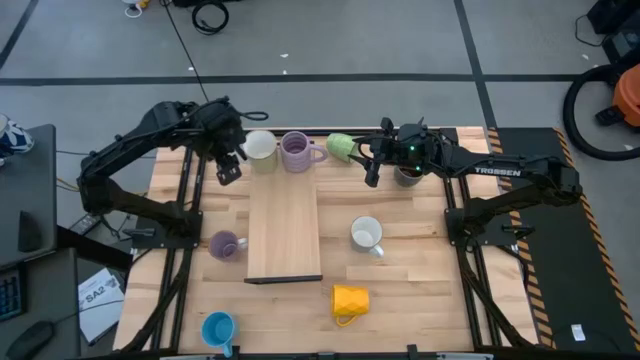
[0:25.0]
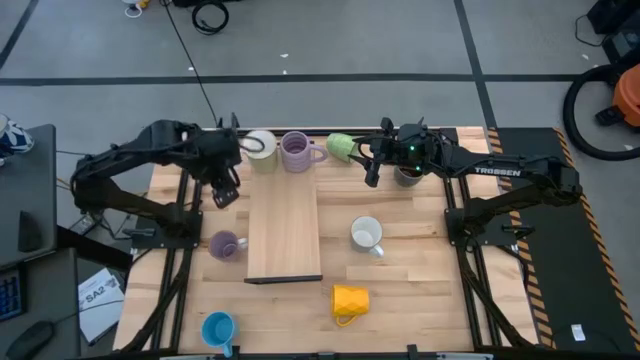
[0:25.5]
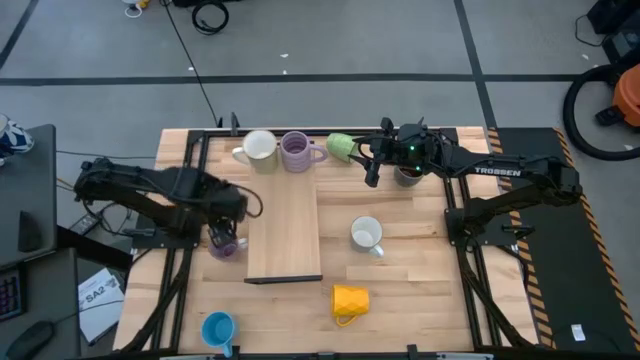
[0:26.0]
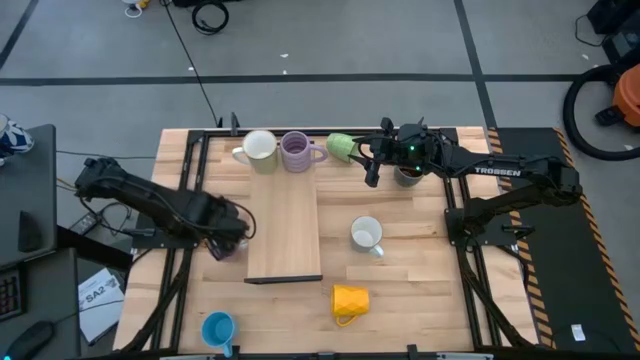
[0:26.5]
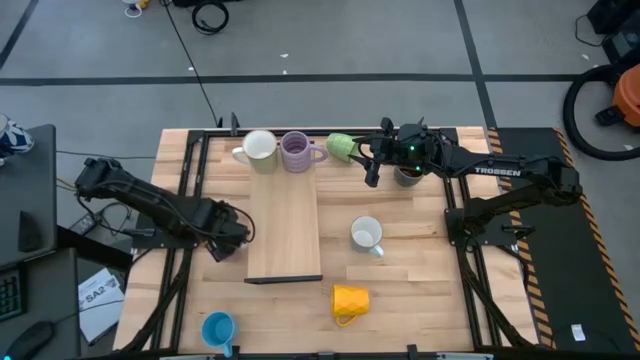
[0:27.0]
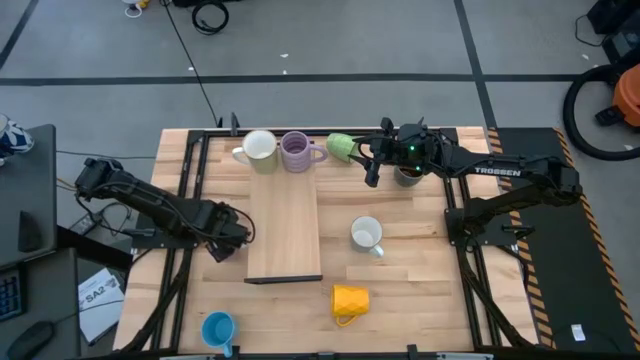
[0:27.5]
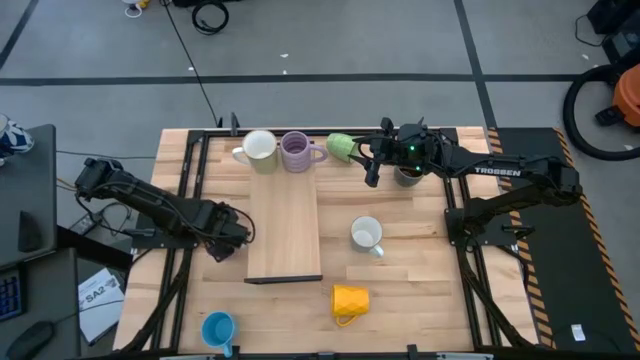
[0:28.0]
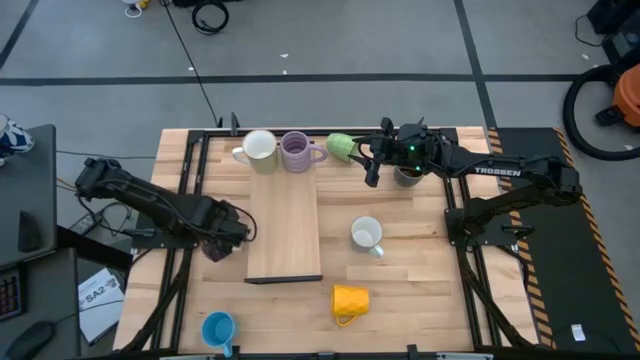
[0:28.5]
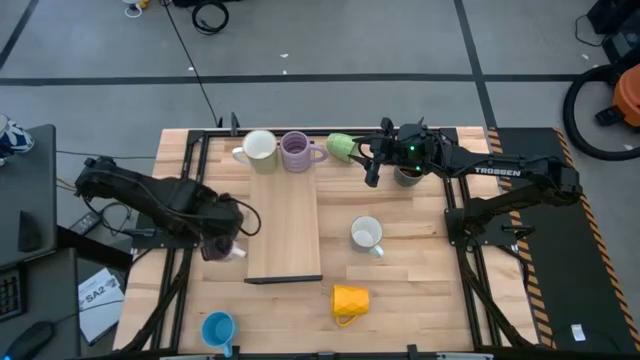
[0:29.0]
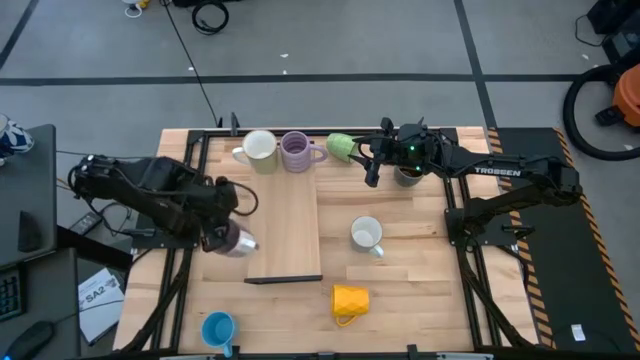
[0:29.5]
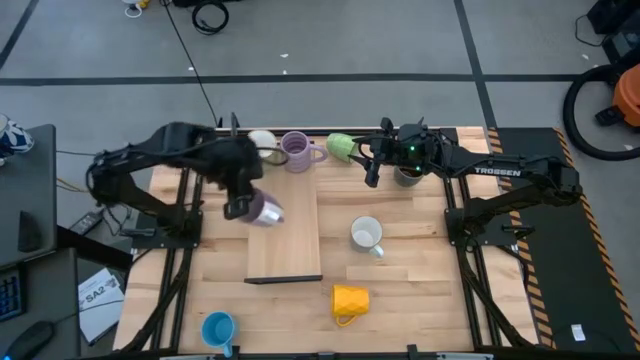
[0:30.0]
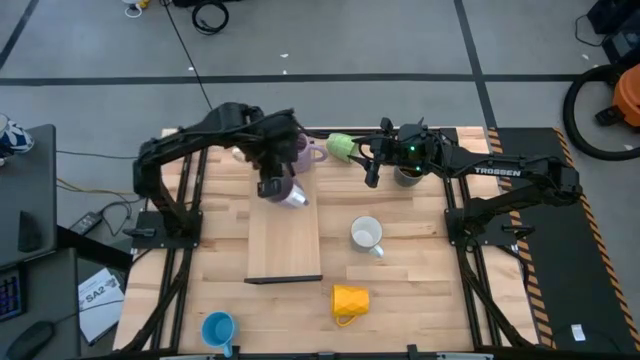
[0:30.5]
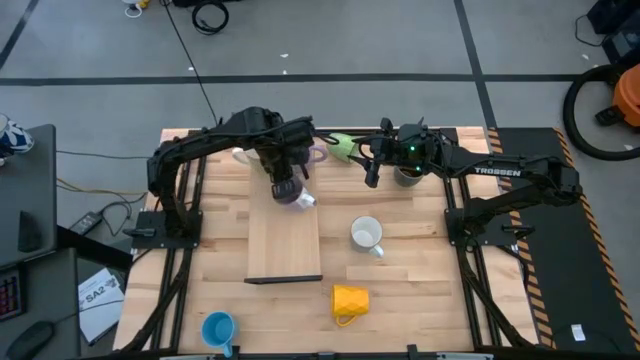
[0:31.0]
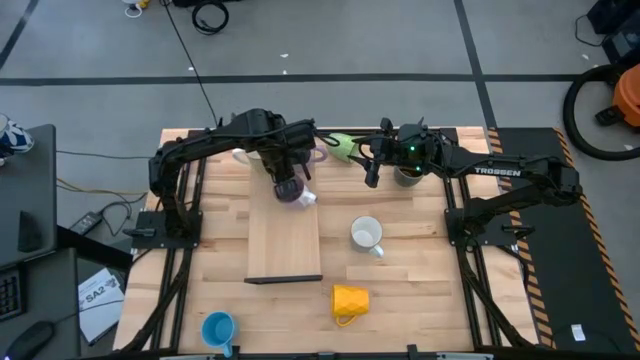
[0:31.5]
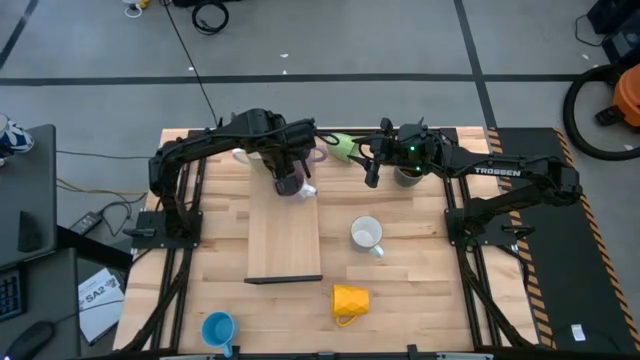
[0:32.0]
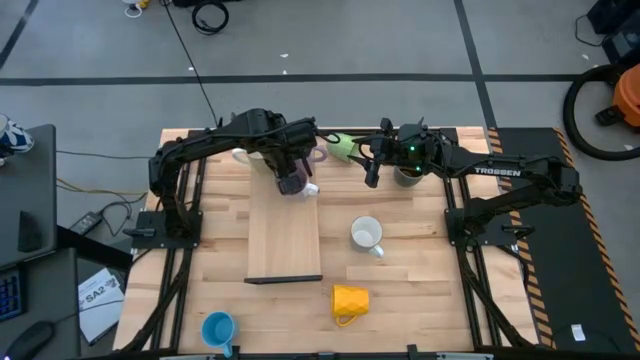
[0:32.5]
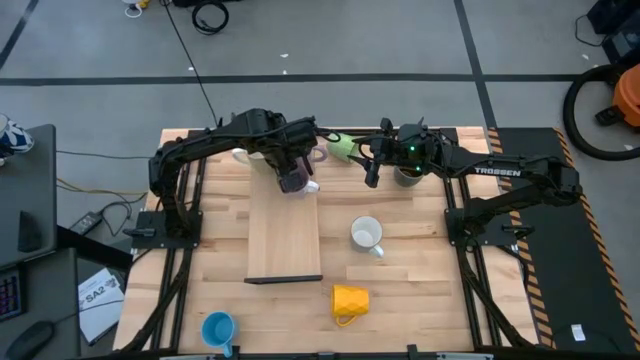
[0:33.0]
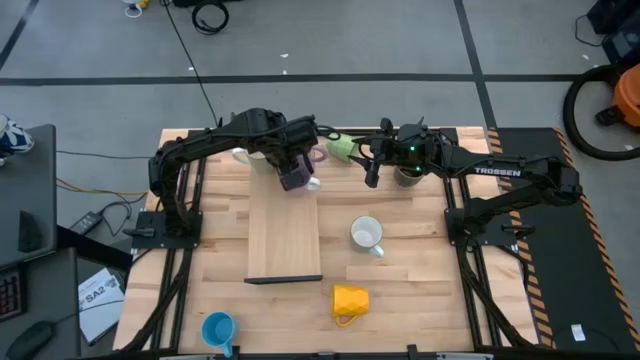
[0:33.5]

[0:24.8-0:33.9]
Task: Place coffee mugs
Put the purple mug on the shelf

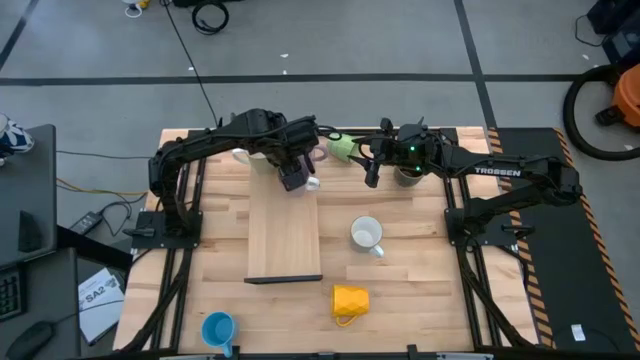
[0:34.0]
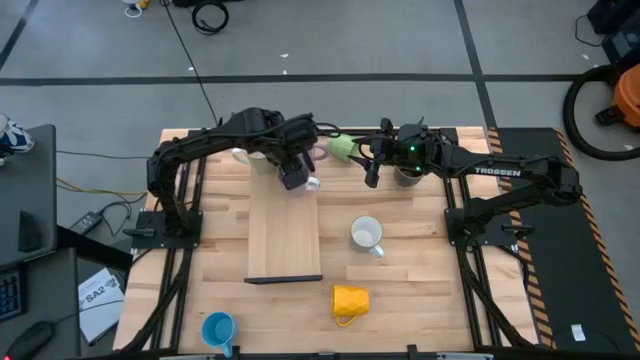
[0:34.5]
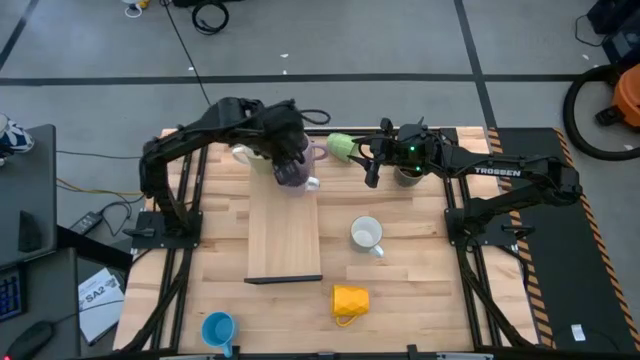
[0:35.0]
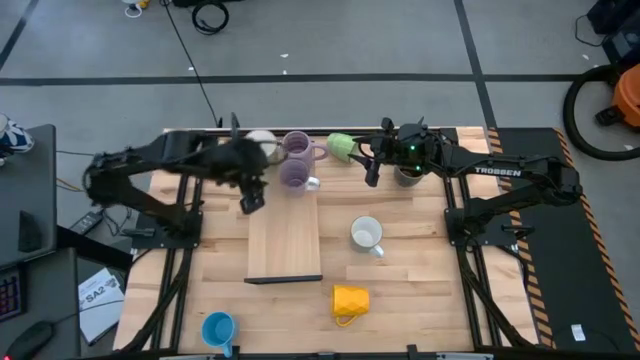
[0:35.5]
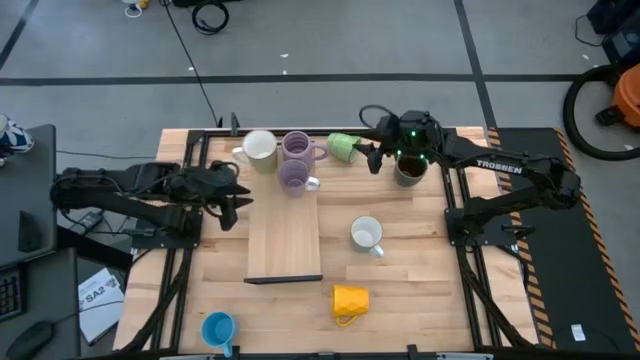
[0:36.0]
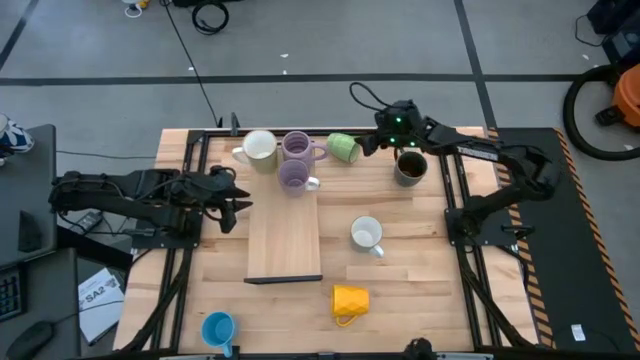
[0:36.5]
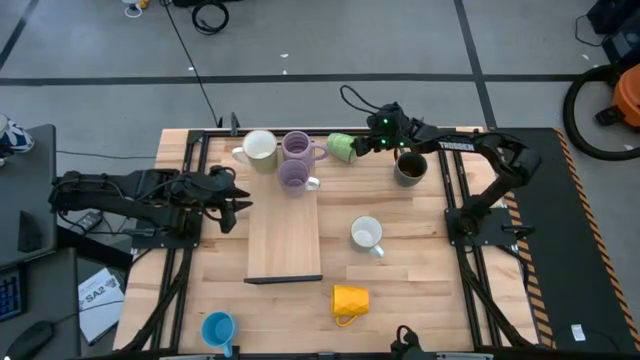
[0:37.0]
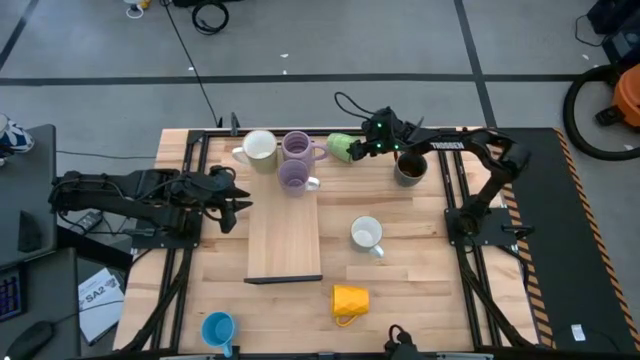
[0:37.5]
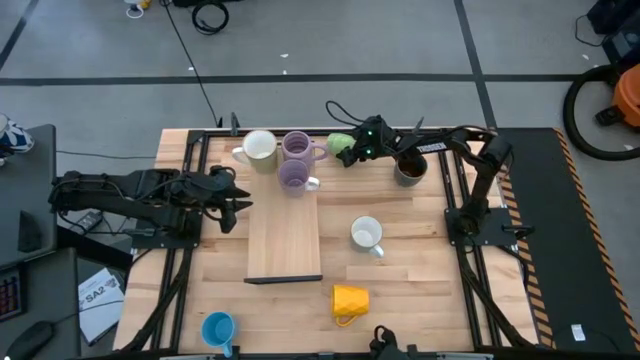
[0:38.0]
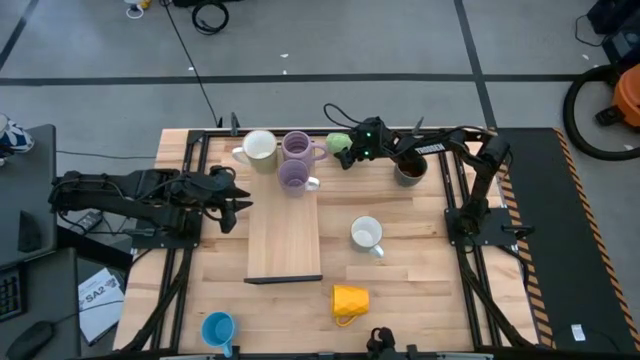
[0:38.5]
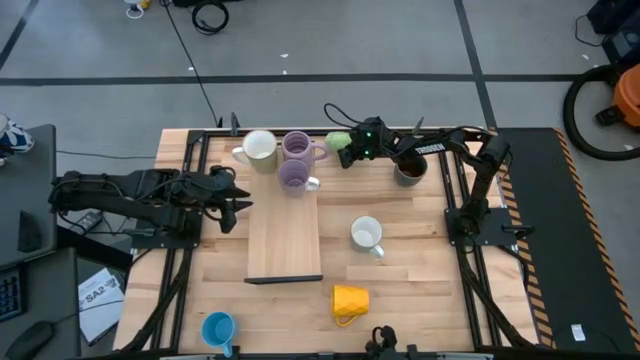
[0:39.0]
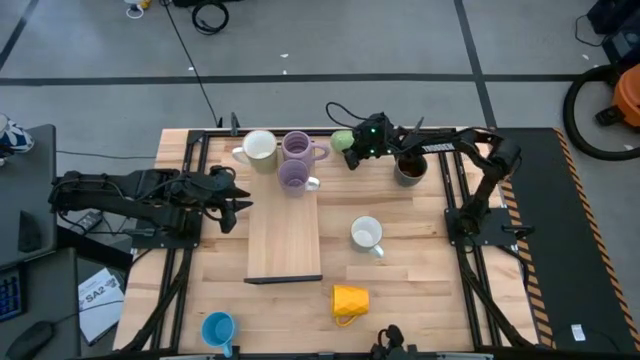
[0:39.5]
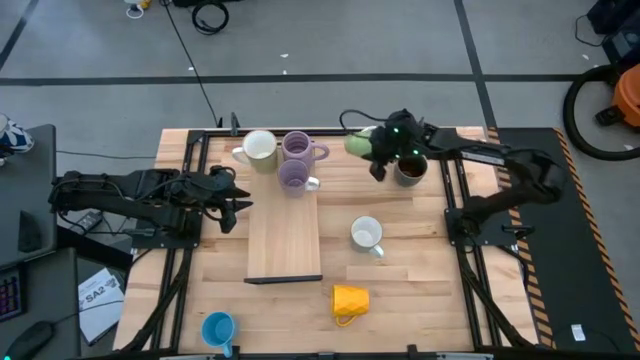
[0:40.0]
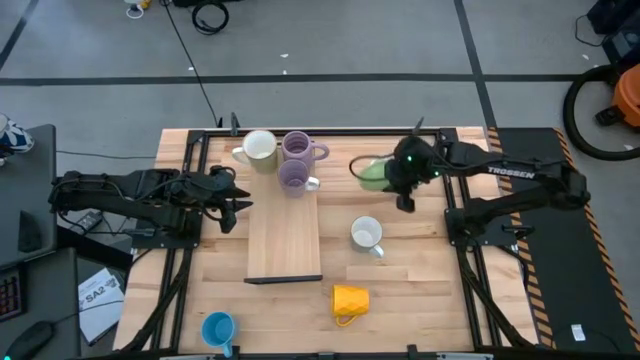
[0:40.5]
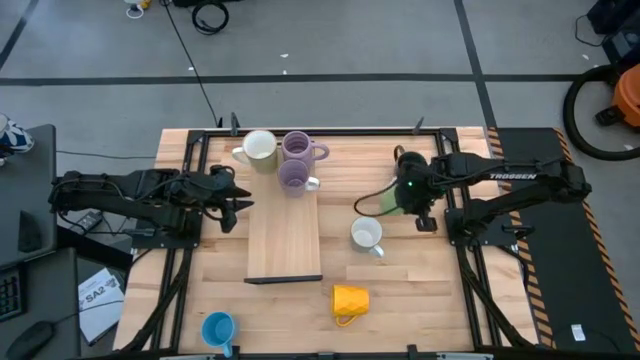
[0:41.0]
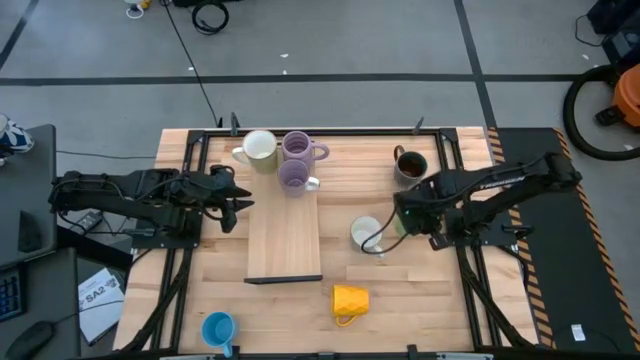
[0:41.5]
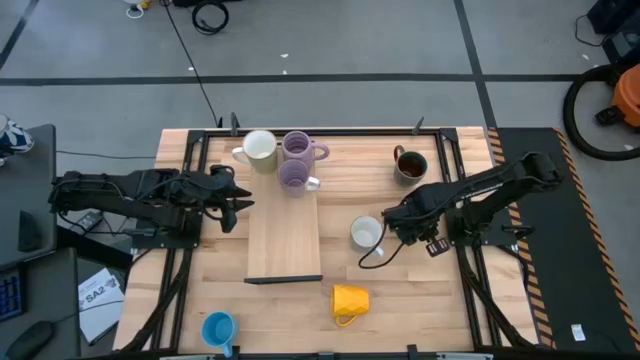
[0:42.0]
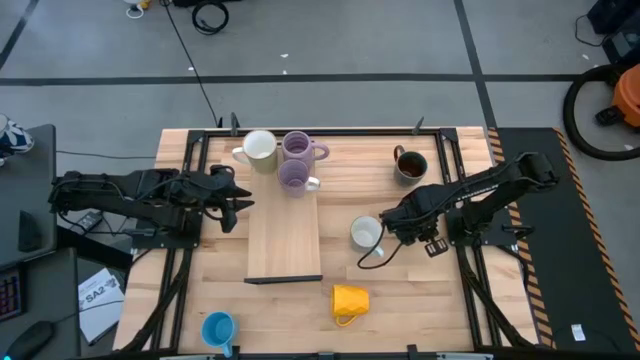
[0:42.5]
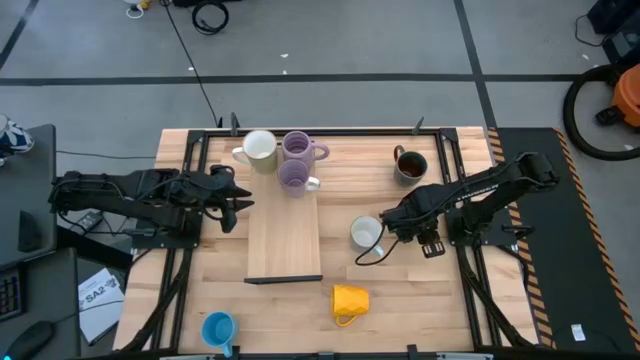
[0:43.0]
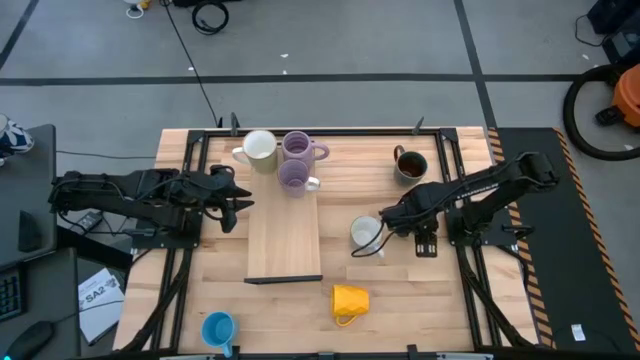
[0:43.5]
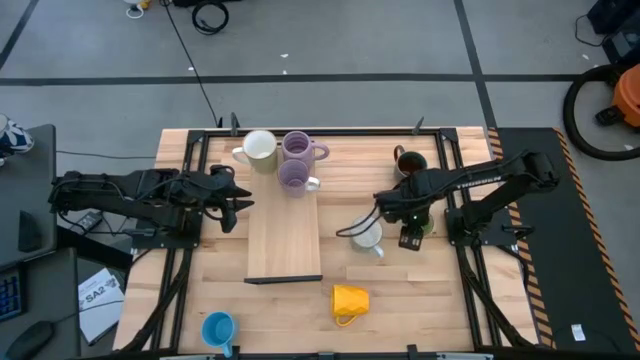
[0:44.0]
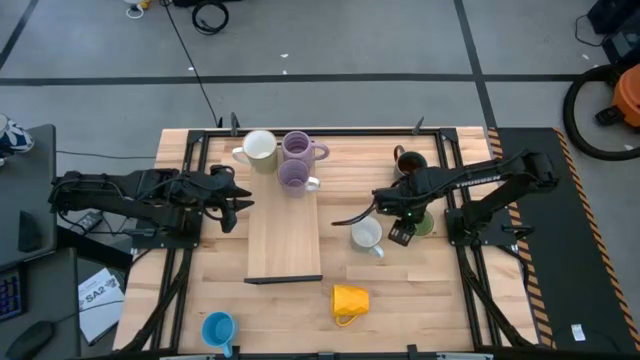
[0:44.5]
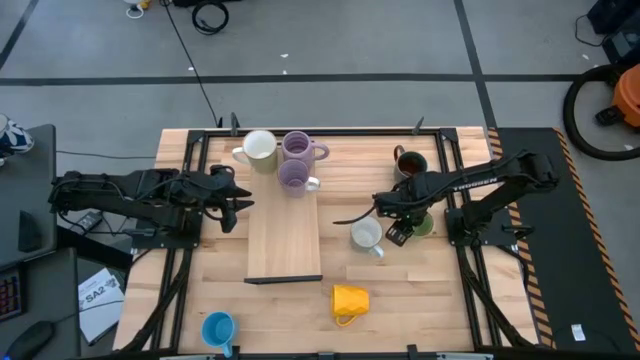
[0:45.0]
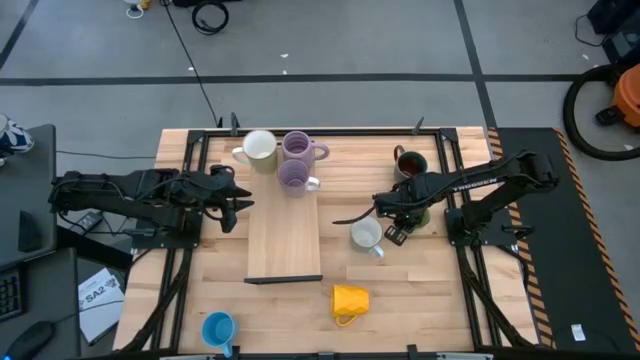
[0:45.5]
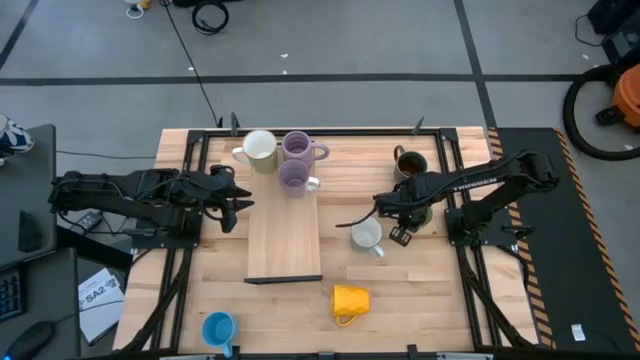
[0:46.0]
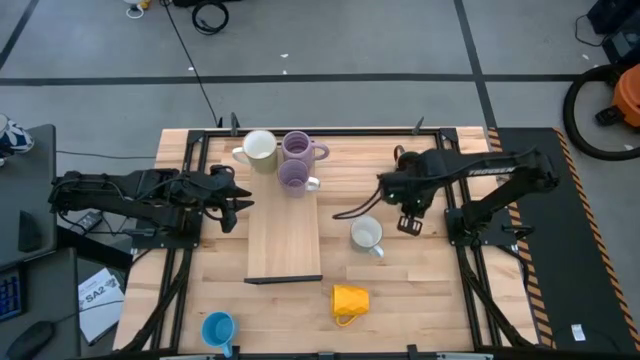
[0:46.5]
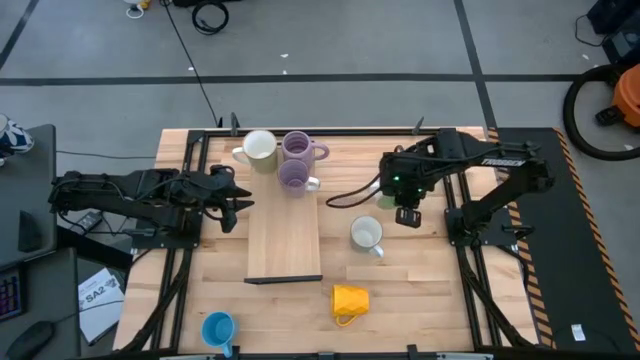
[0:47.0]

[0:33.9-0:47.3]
Put the green mug on the shelf
